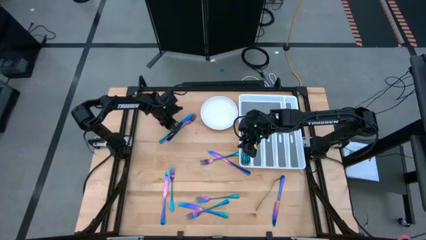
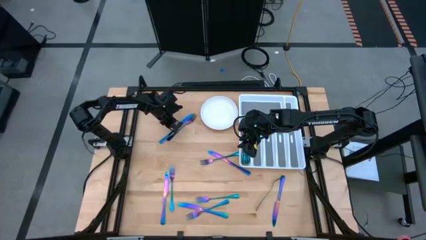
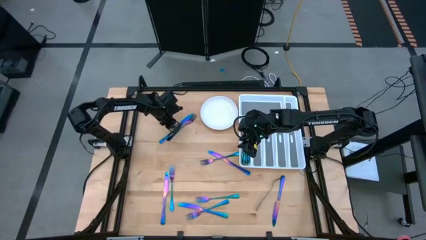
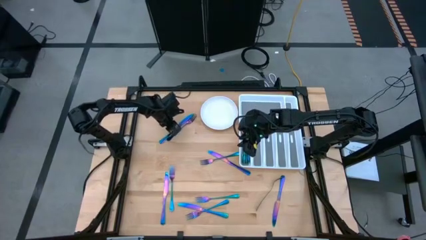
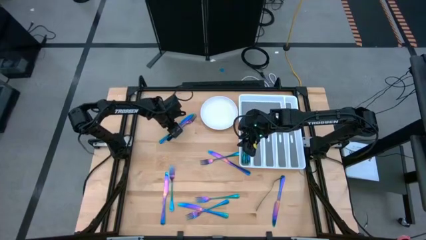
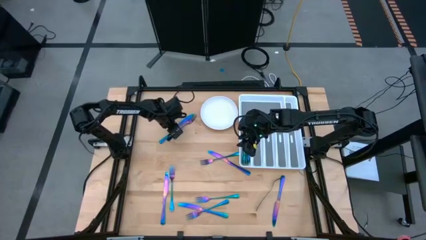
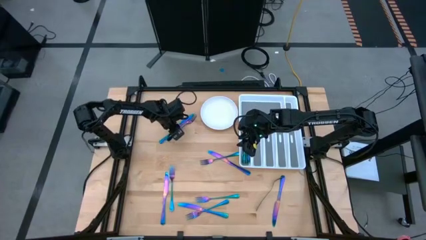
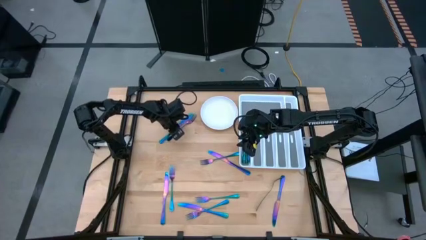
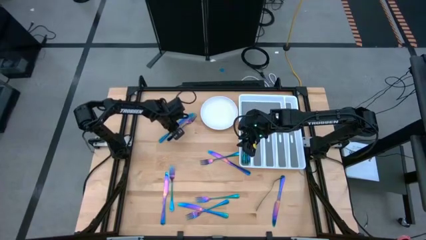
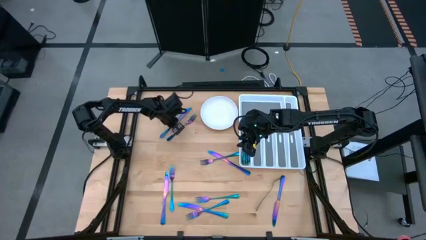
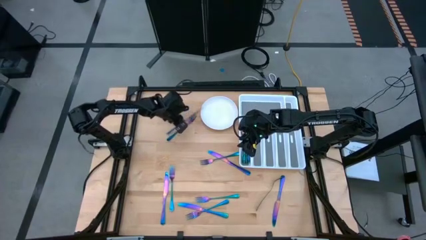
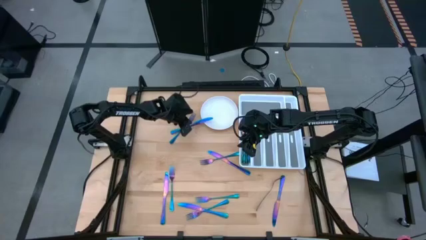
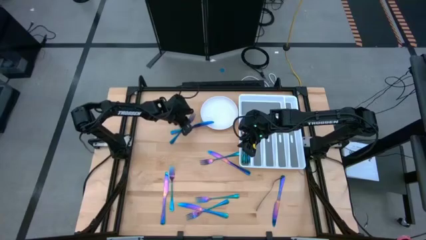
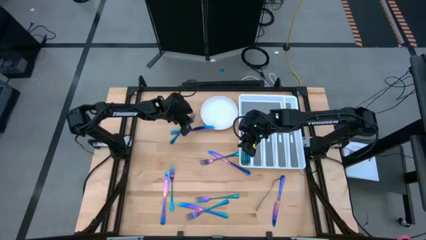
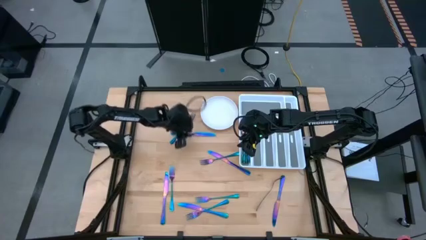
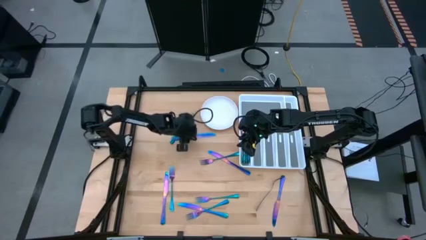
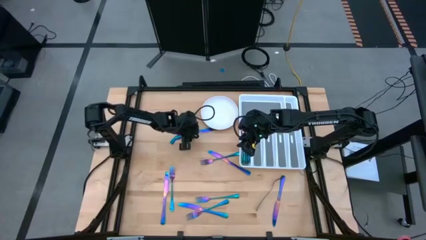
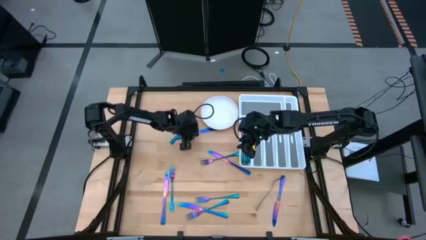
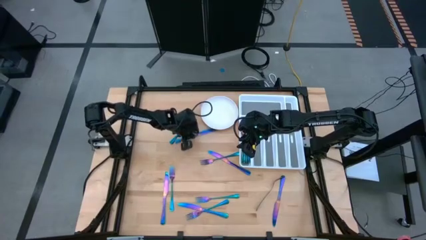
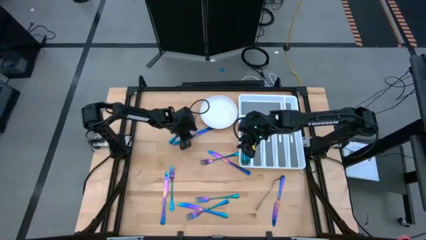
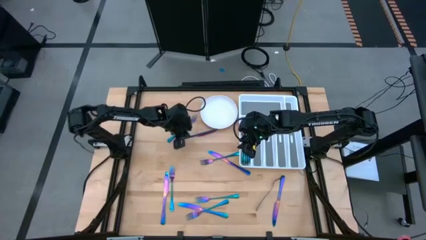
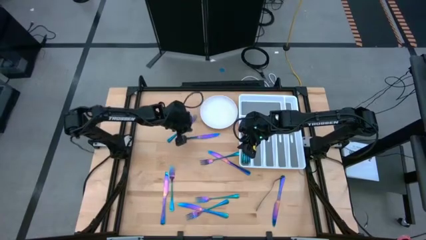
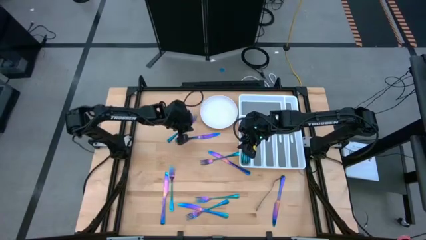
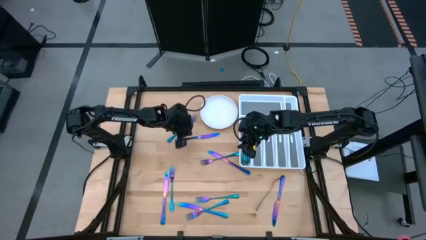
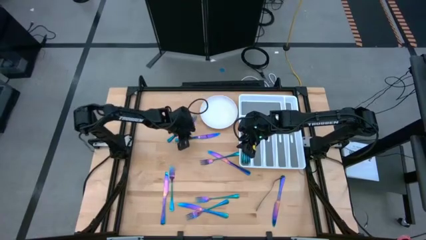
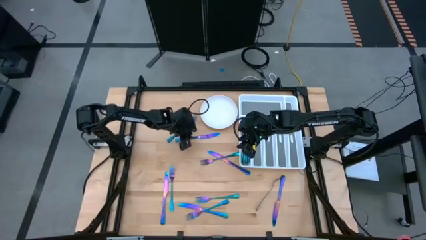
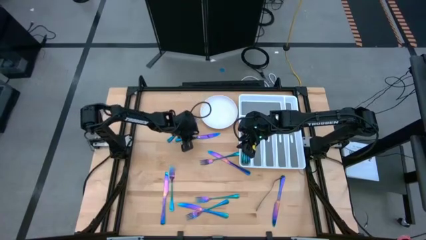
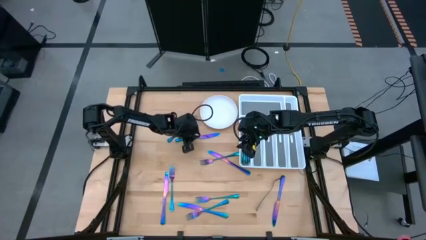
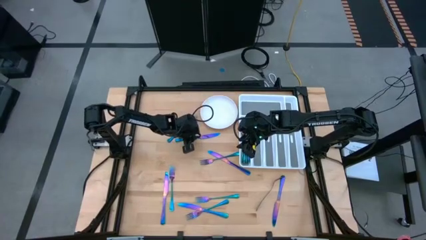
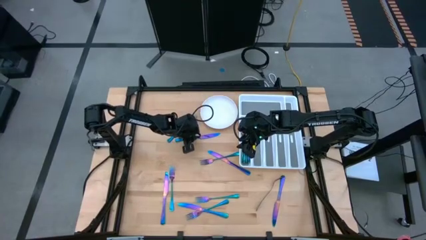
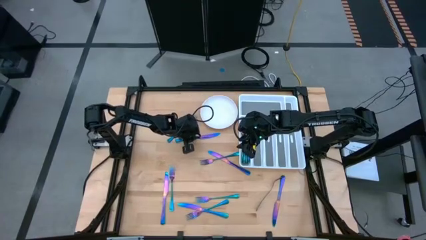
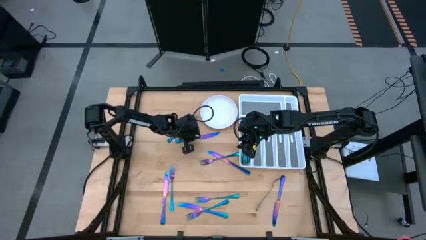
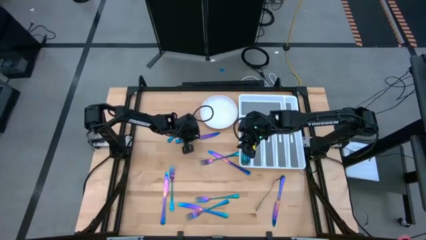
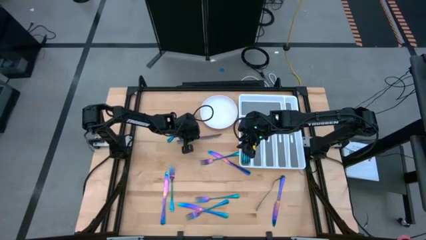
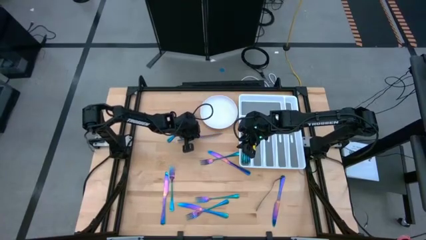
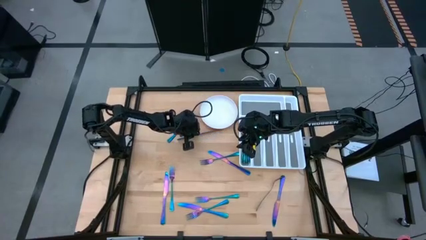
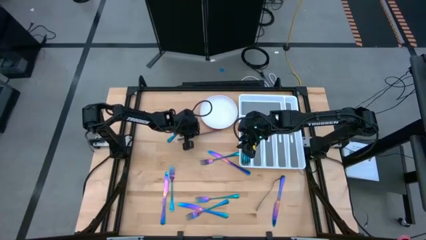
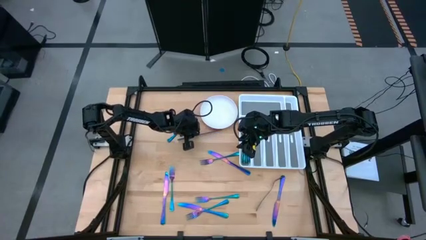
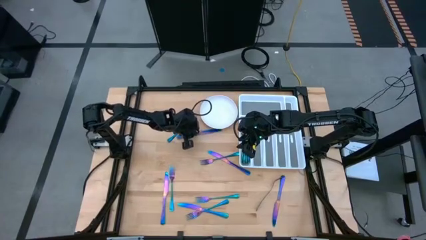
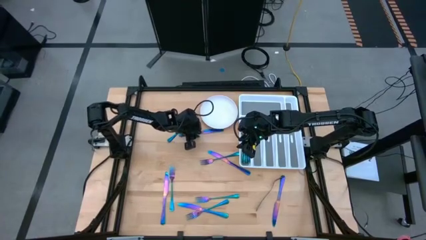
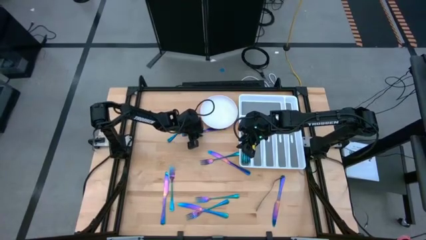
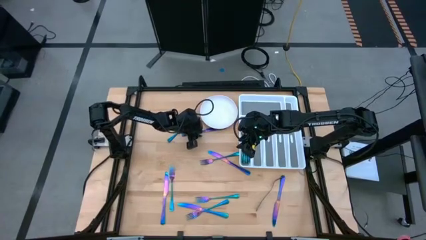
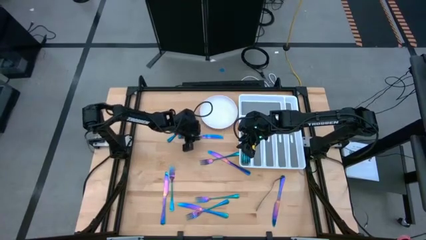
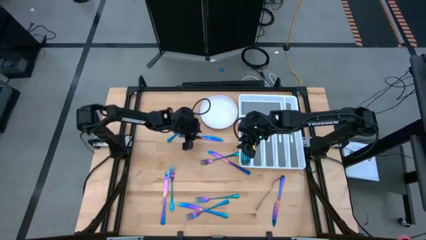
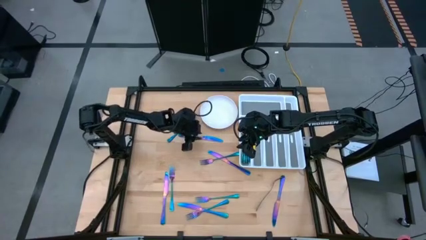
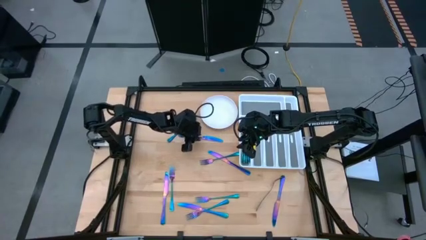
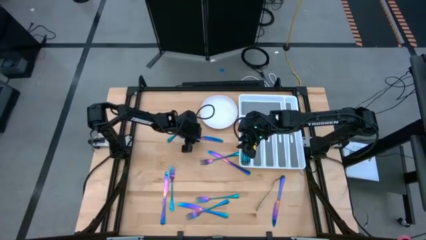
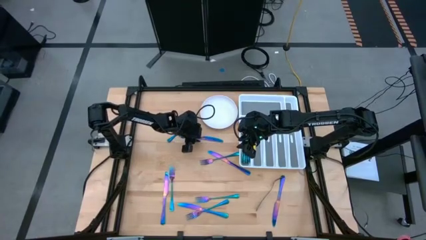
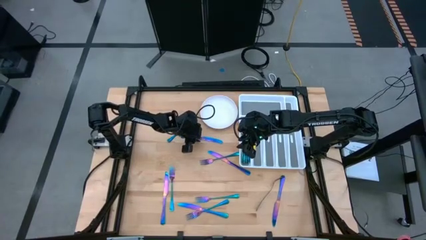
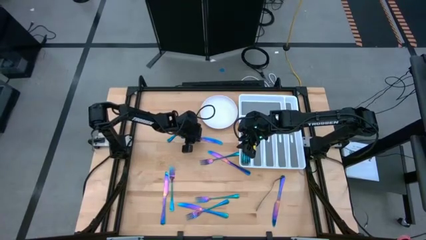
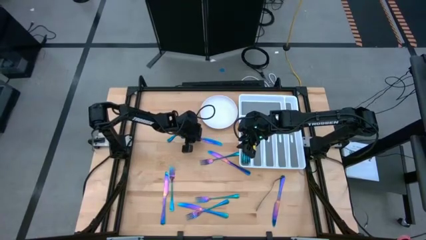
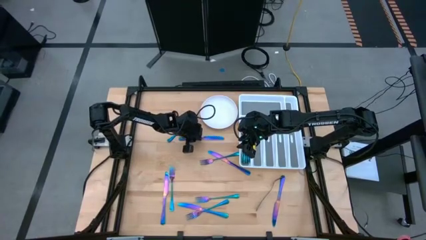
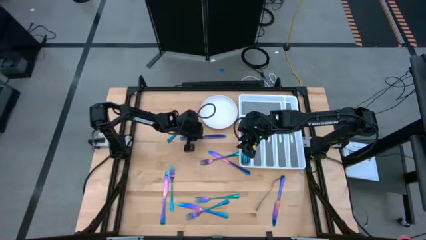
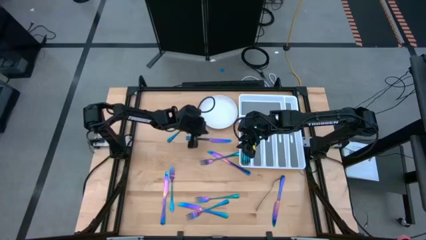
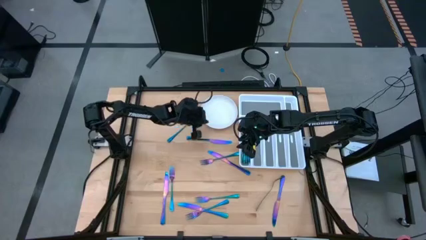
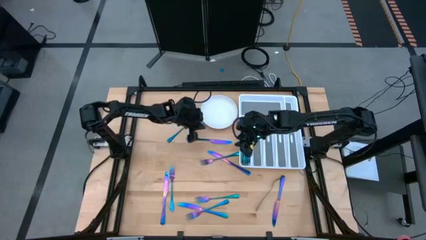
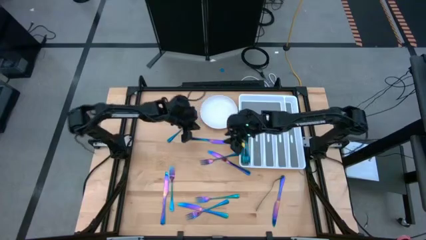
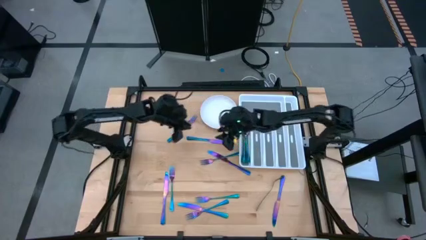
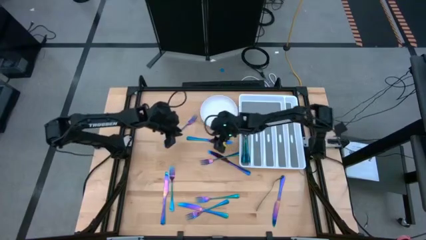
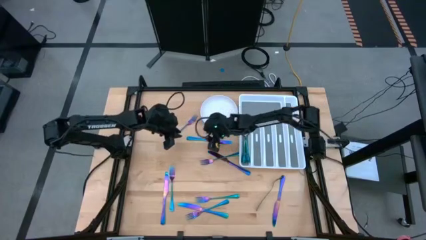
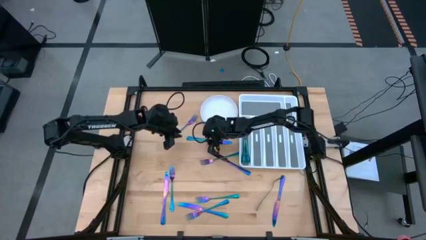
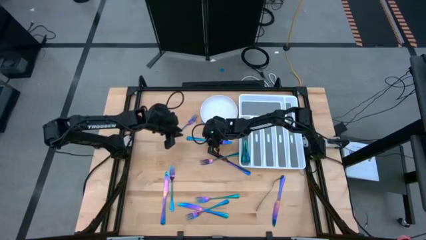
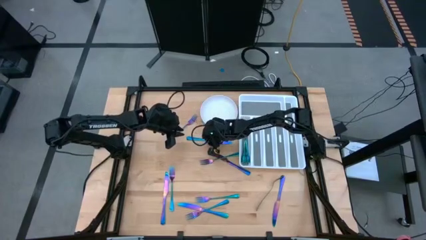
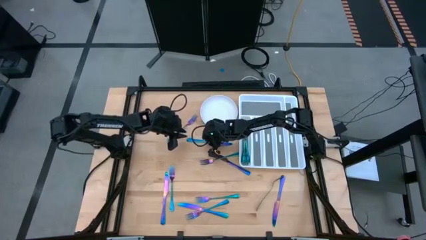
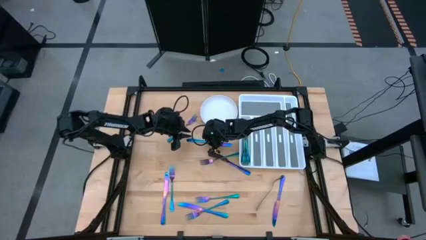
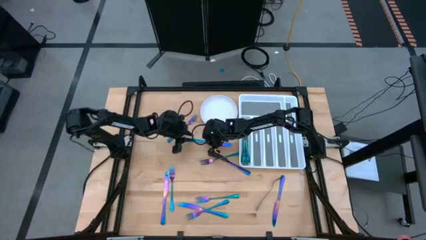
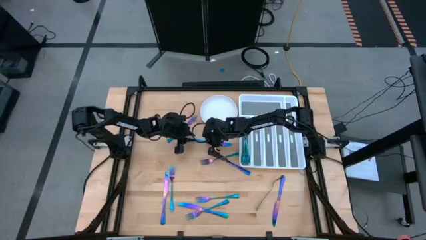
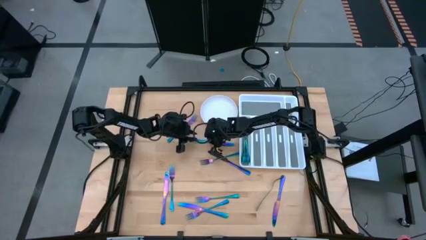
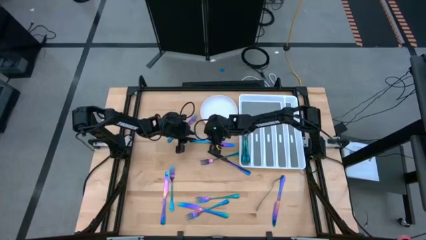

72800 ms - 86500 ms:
Task: Sort silverware
Put the purple table knife on the white silverware tray

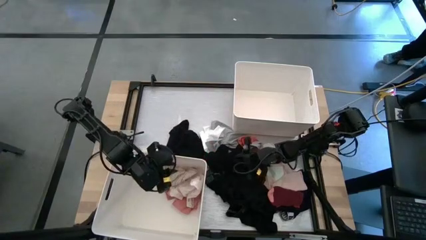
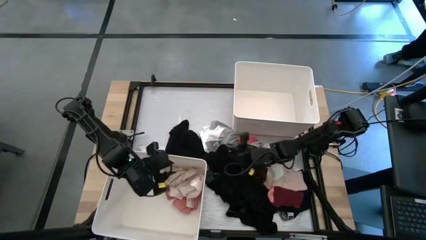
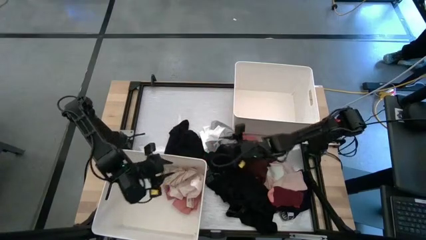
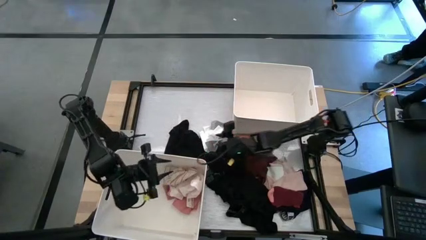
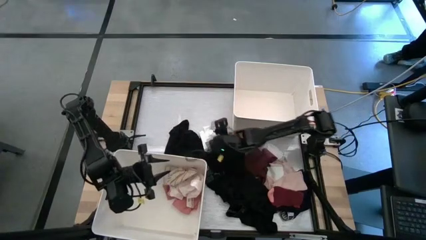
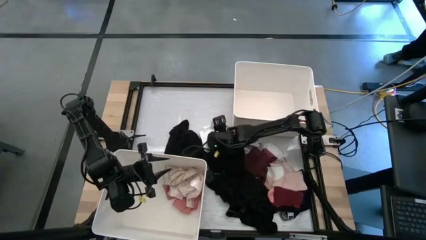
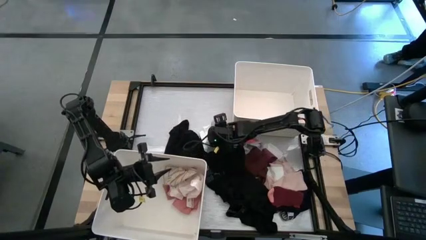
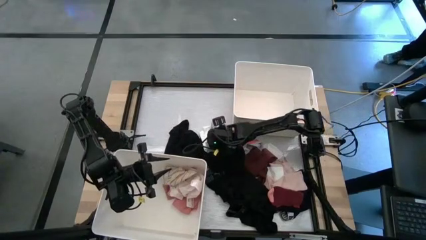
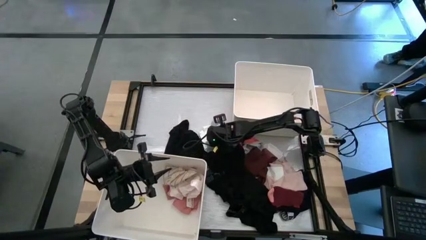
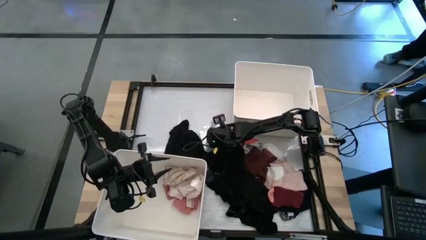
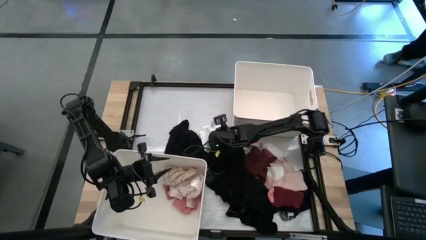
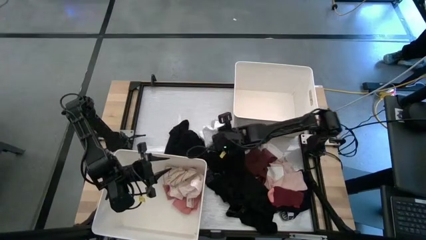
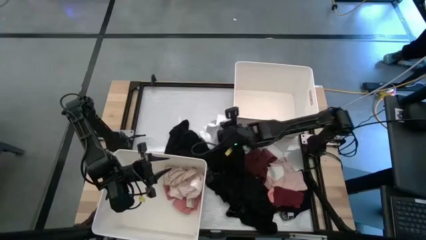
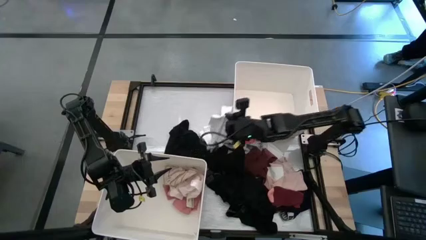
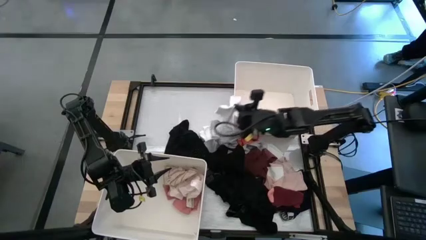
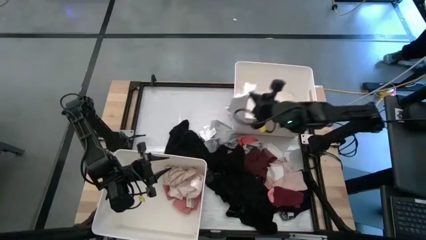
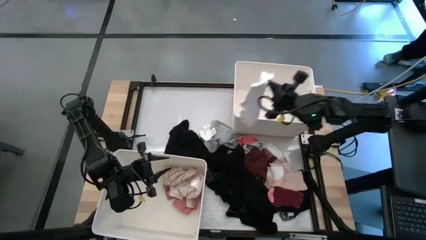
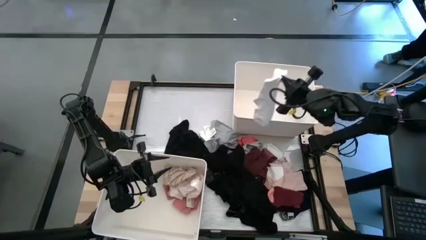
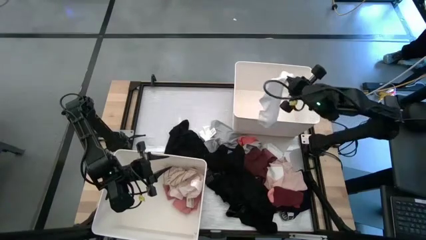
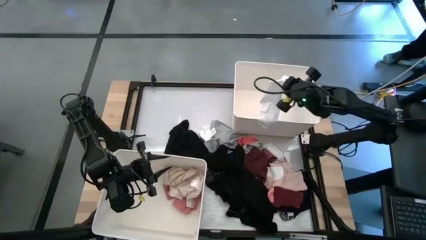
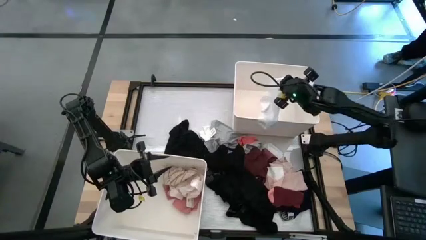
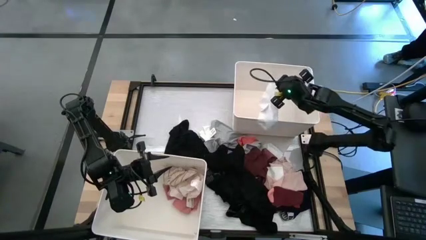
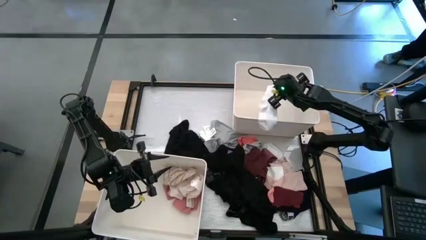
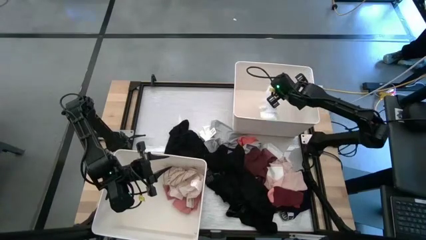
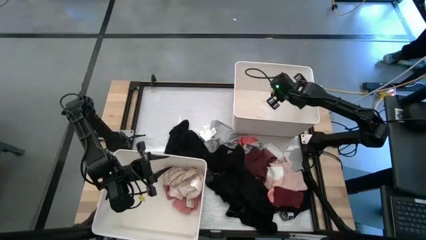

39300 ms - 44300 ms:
Task: Sort clothes
Put the white sock into the top white bin
